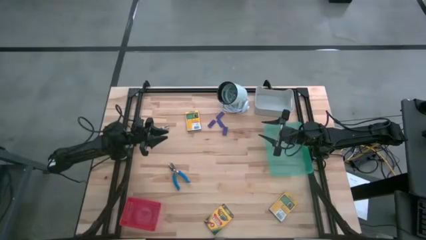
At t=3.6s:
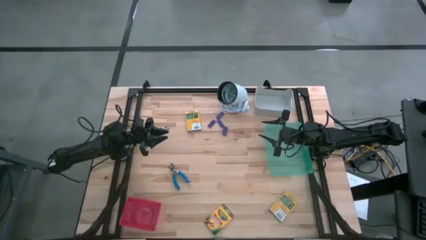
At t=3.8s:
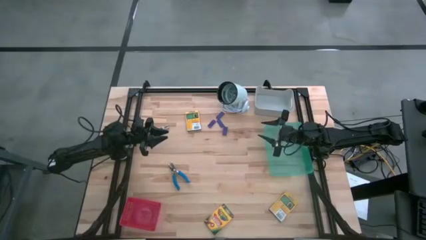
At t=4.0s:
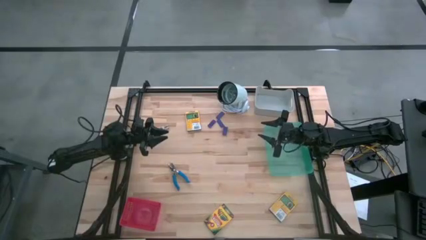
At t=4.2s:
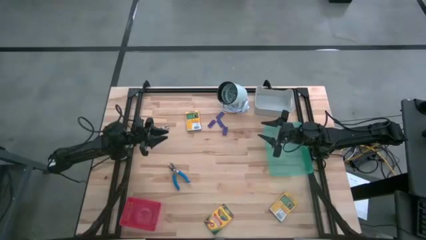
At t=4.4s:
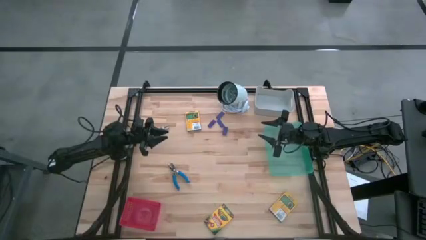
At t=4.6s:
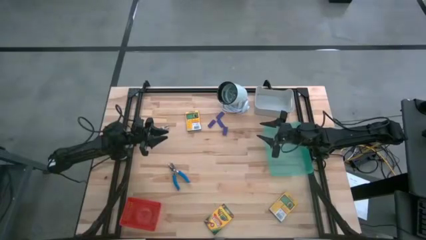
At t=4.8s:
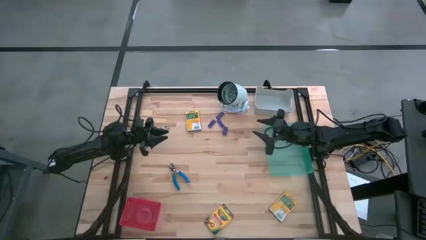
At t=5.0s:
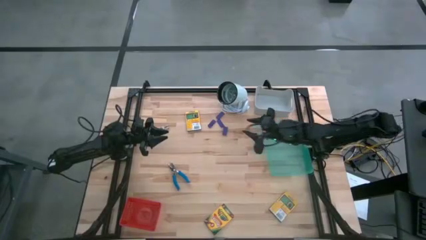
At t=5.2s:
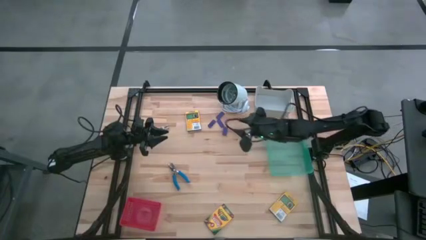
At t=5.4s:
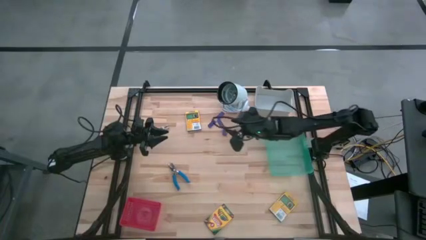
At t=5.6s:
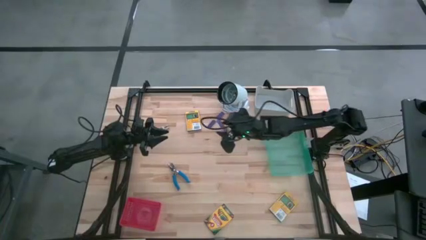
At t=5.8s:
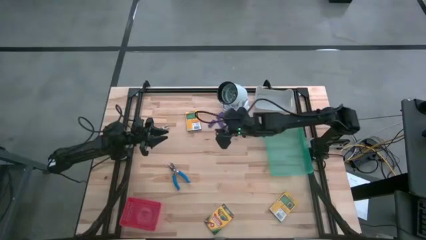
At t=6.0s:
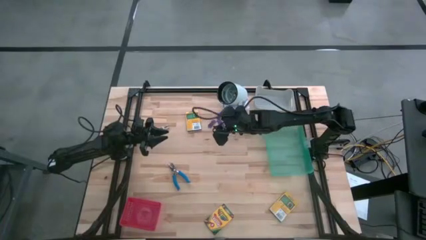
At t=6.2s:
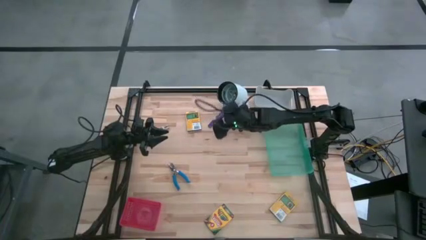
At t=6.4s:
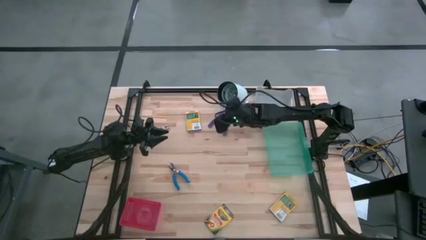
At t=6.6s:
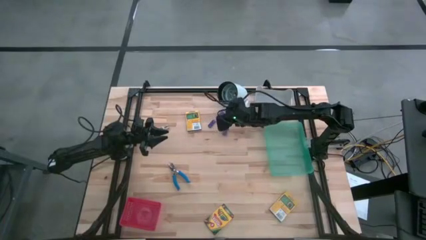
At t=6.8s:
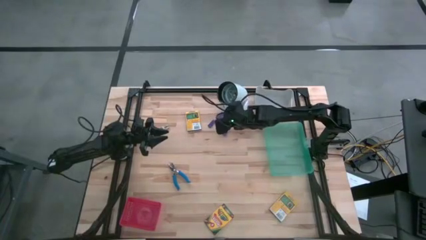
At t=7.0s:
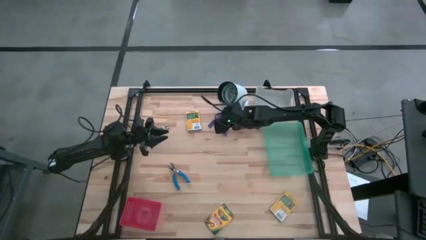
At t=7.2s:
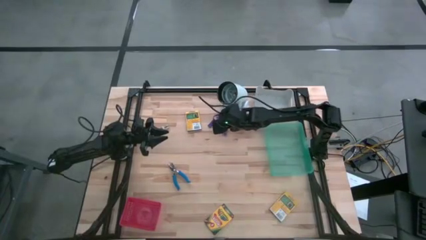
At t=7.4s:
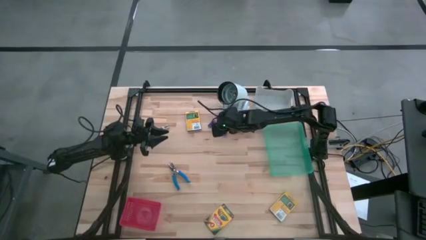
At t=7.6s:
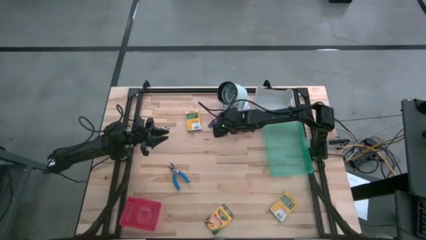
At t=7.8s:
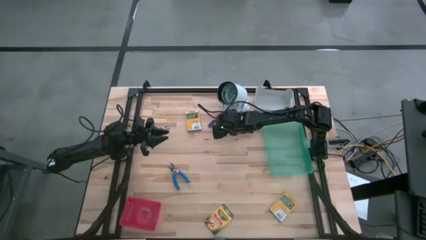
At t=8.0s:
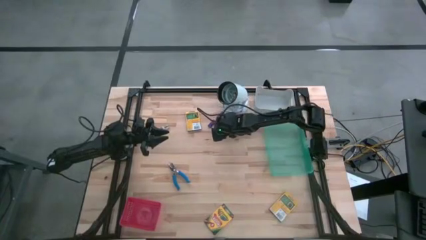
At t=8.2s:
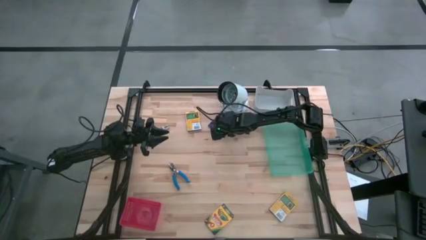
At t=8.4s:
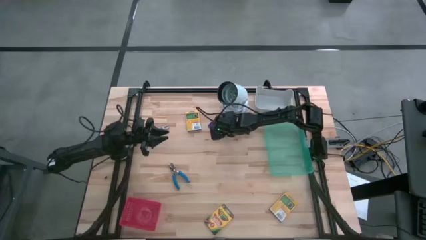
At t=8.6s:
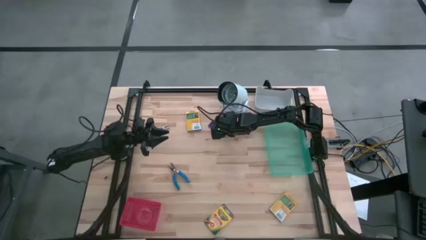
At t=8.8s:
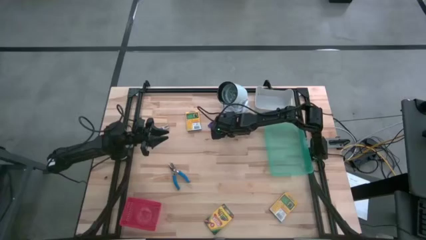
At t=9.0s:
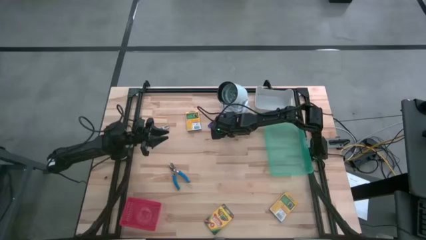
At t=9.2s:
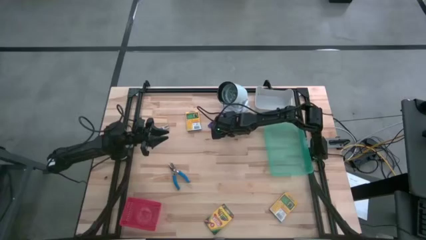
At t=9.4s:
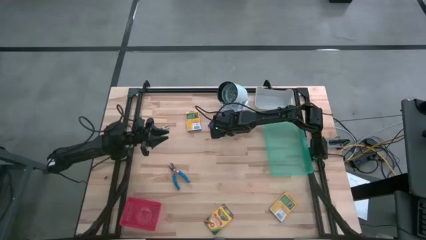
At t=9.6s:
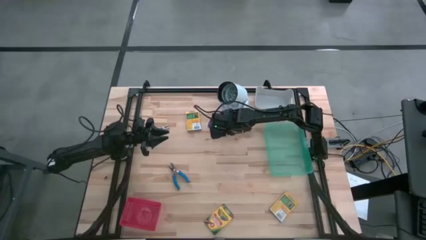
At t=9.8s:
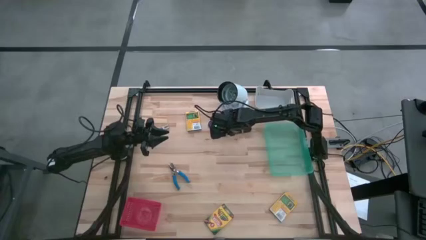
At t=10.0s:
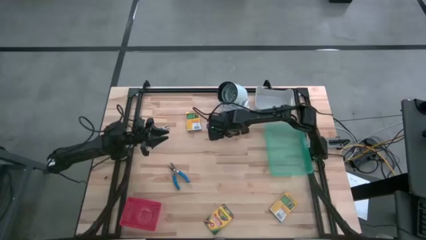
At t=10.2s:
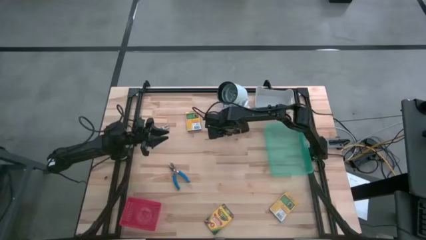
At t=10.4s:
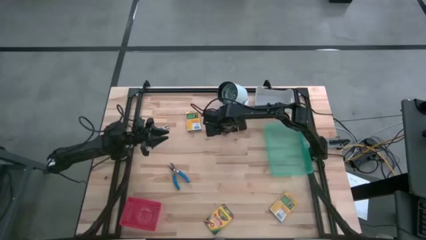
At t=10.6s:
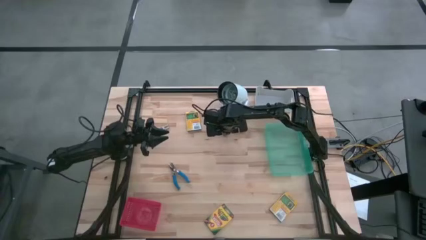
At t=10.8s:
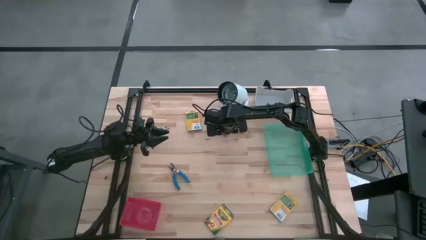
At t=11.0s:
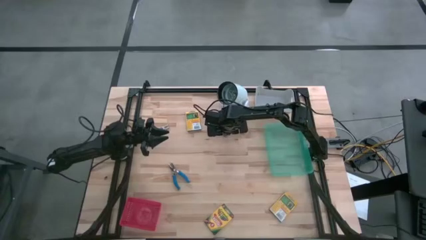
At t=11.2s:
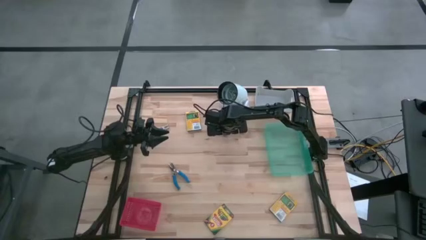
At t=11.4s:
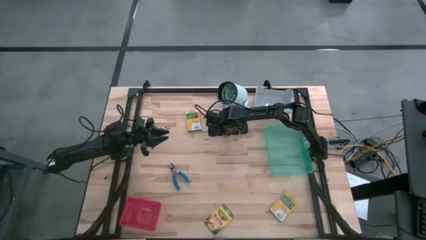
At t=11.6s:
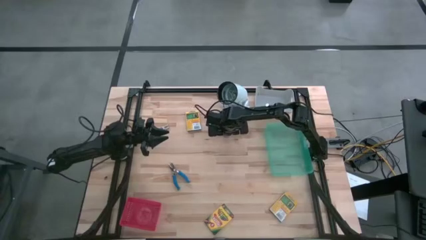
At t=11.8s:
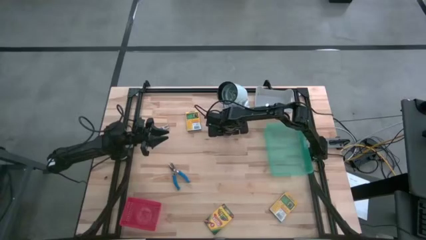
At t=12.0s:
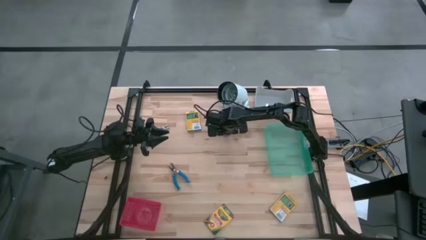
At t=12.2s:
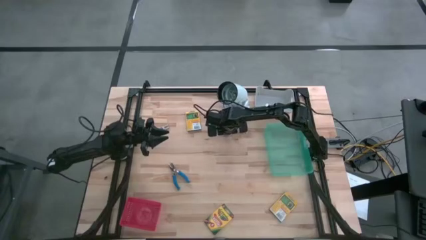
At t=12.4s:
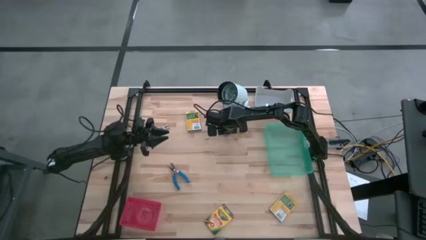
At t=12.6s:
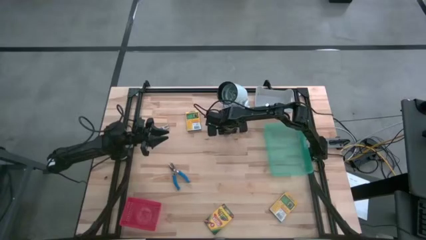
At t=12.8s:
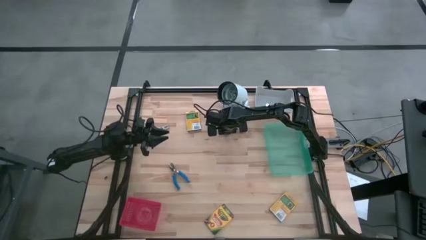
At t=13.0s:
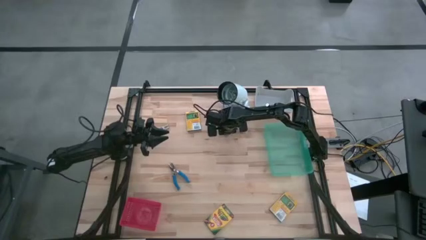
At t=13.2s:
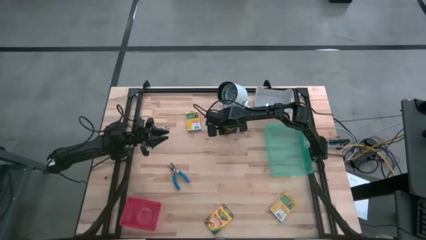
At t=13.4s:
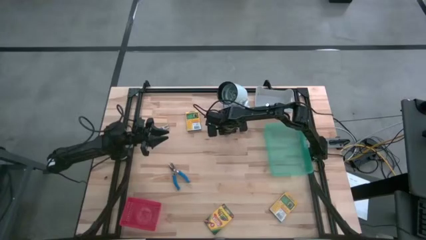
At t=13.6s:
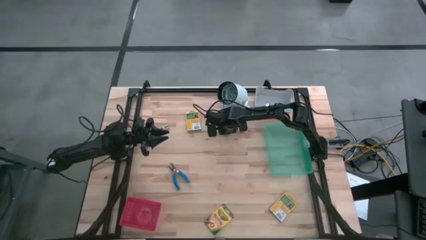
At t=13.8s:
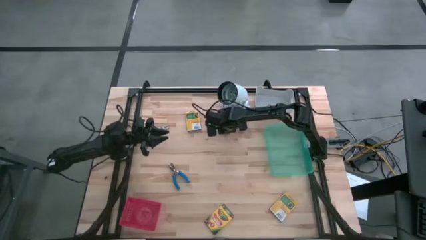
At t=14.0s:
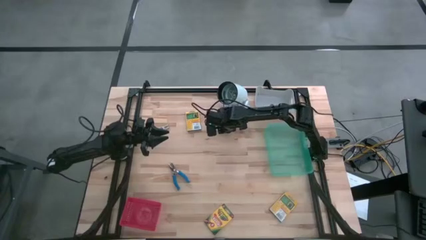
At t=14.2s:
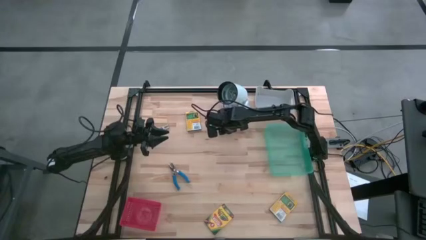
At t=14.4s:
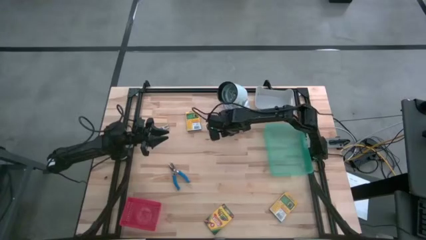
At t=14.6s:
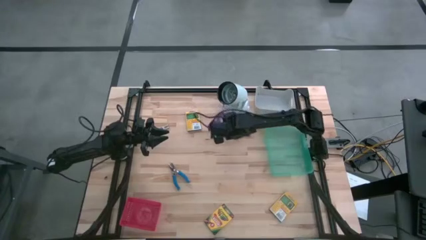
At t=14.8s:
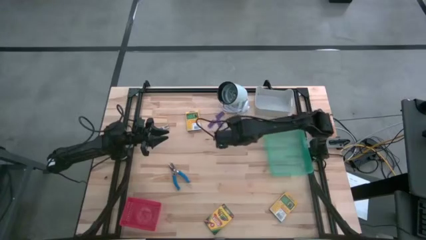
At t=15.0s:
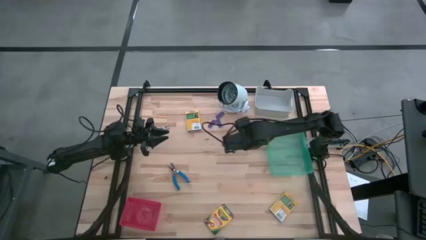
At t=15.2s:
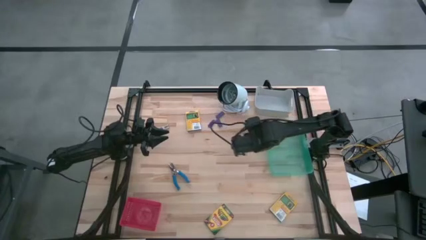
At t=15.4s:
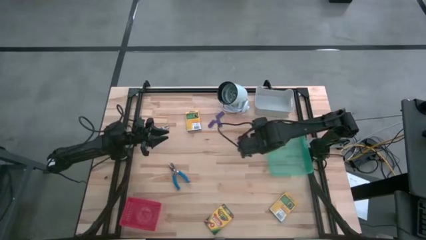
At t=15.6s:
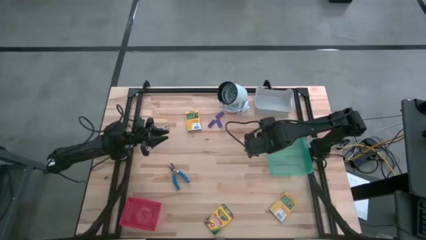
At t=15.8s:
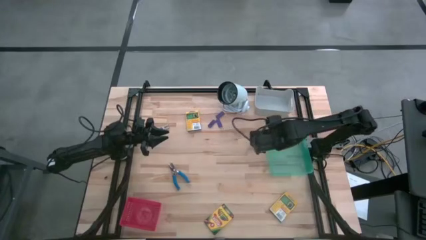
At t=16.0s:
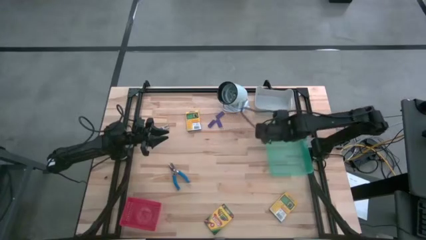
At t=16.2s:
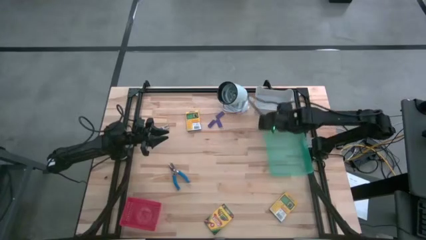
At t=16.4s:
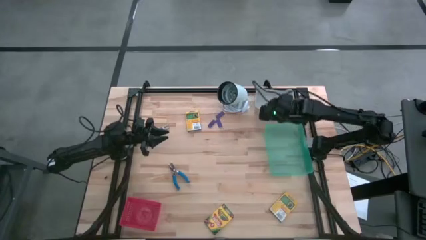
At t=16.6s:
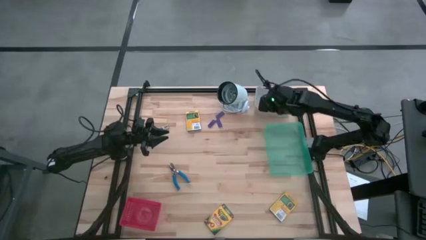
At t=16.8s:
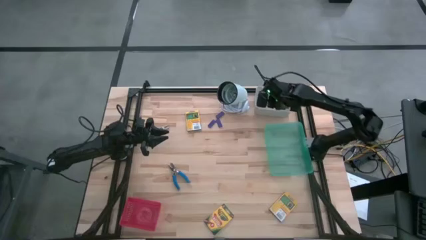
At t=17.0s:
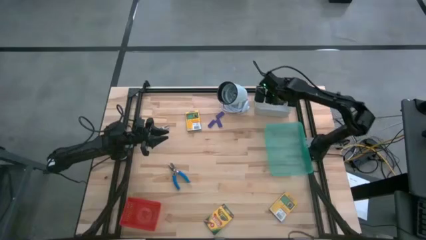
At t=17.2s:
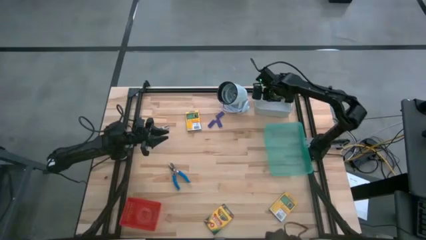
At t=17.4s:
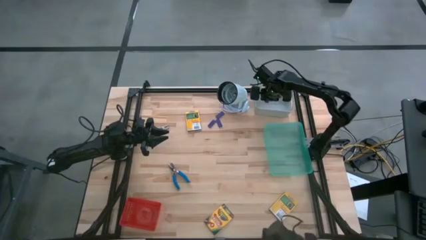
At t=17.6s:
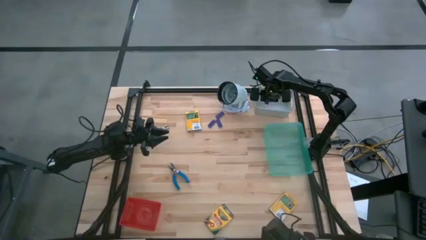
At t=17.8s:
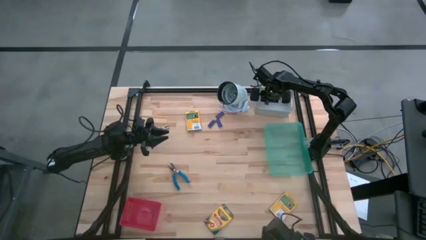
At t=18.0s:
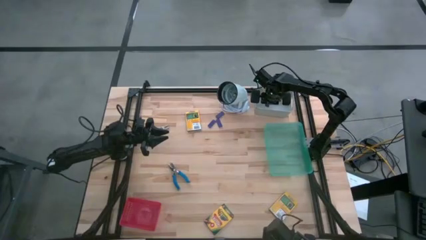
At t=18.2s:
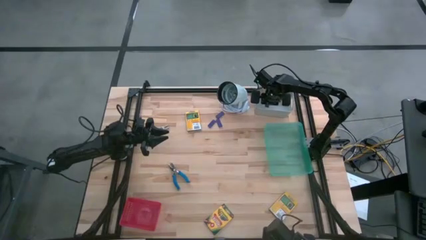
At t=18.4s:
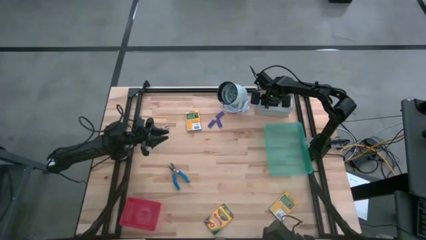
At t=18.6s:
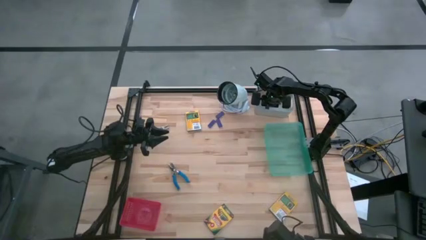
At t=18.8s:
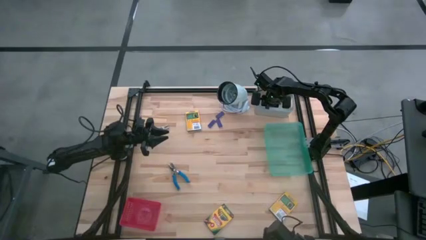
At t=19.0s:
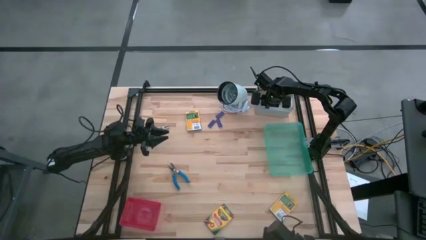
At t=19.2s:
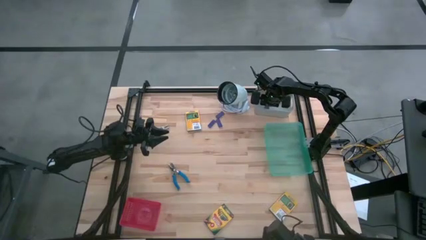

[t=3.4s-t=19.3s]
Task: Pick & Place School Supplies
Put the blue eraser into the gray bin
